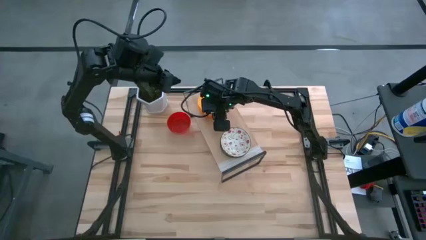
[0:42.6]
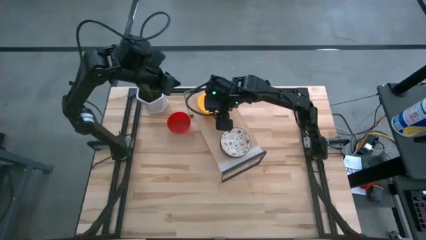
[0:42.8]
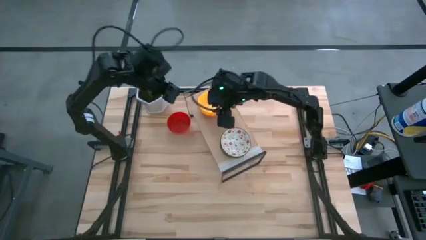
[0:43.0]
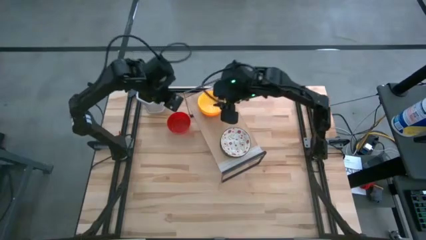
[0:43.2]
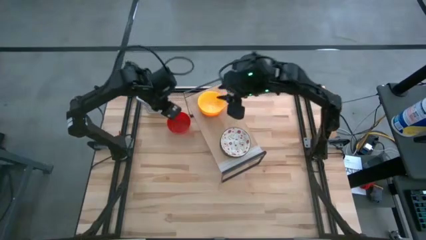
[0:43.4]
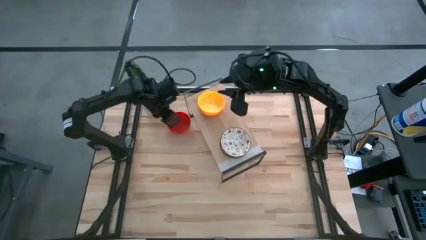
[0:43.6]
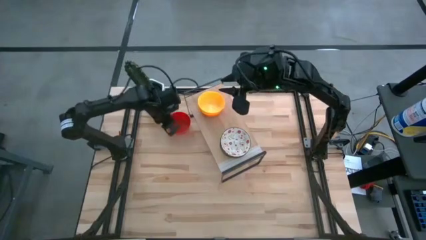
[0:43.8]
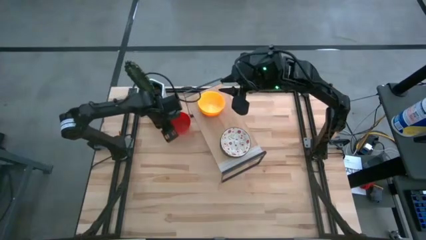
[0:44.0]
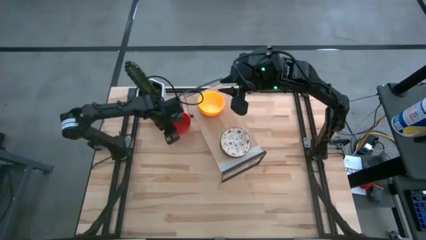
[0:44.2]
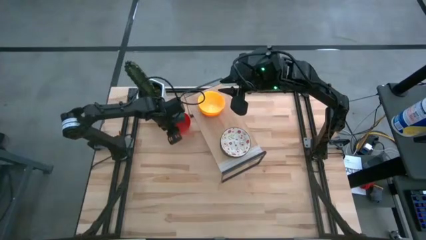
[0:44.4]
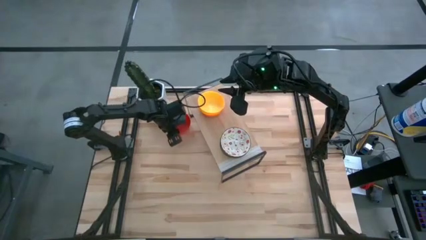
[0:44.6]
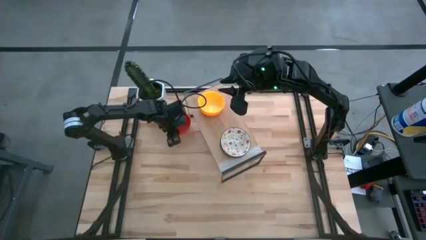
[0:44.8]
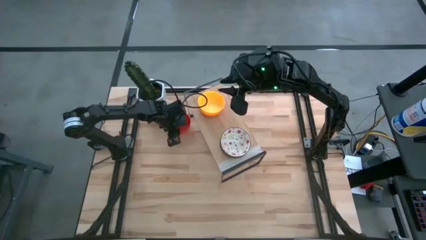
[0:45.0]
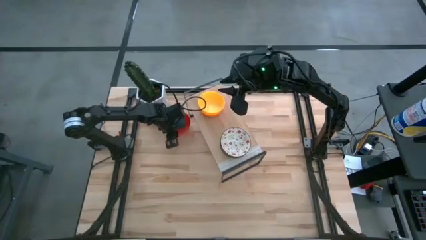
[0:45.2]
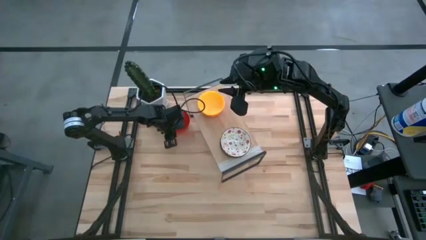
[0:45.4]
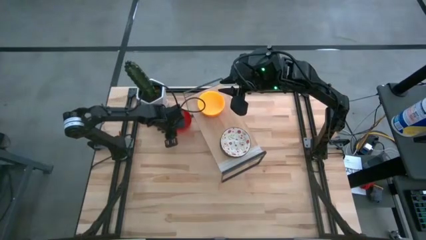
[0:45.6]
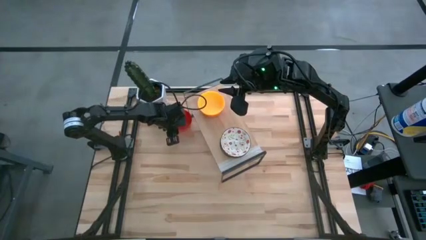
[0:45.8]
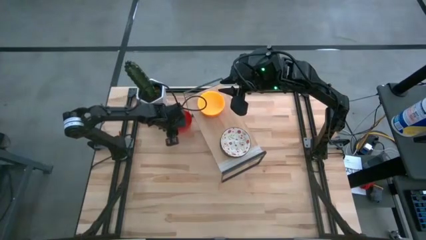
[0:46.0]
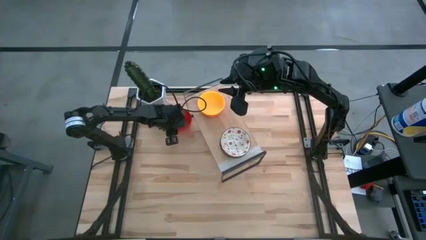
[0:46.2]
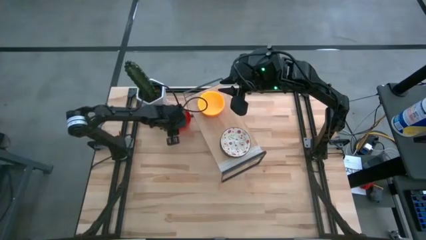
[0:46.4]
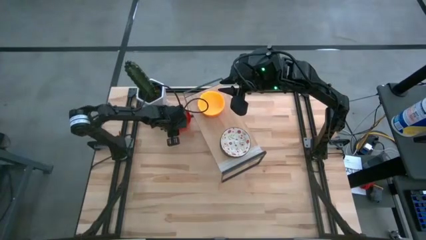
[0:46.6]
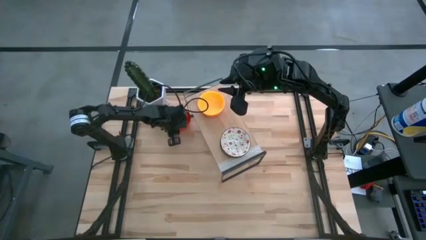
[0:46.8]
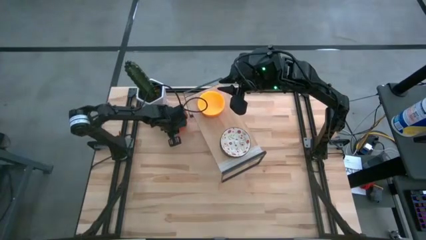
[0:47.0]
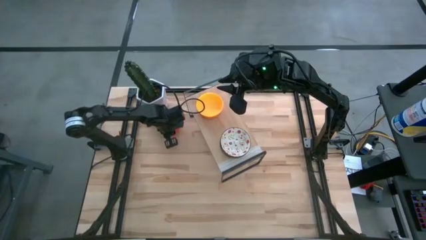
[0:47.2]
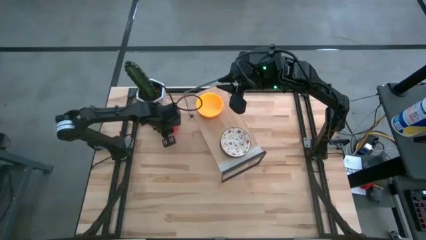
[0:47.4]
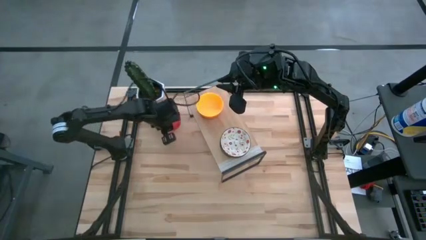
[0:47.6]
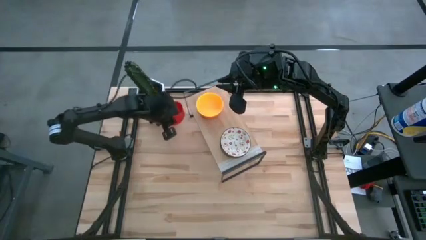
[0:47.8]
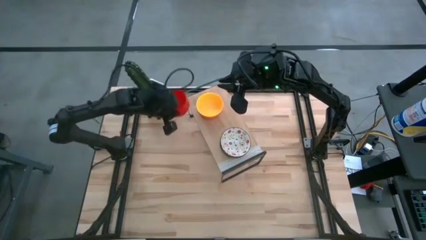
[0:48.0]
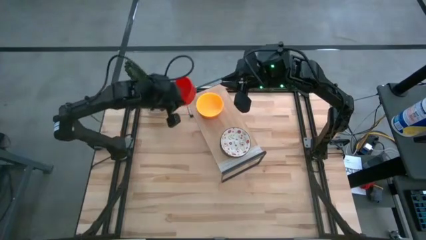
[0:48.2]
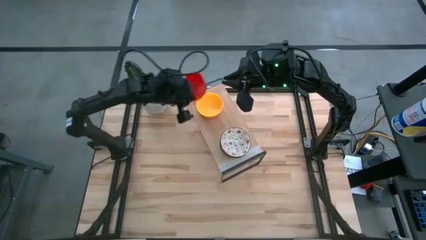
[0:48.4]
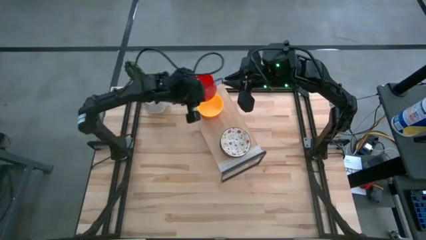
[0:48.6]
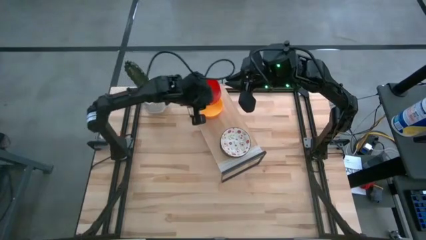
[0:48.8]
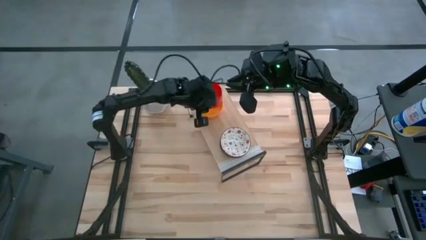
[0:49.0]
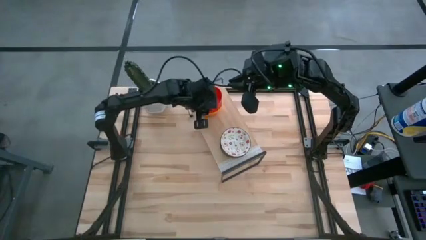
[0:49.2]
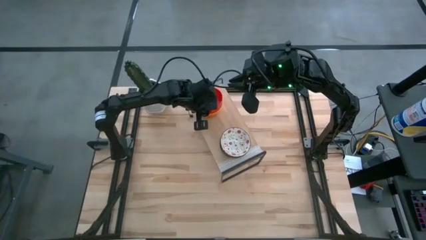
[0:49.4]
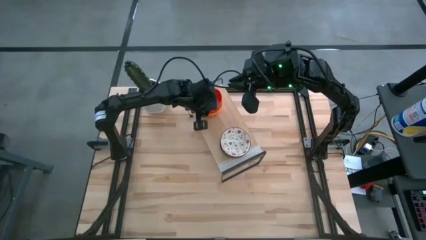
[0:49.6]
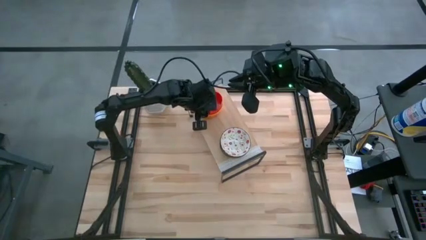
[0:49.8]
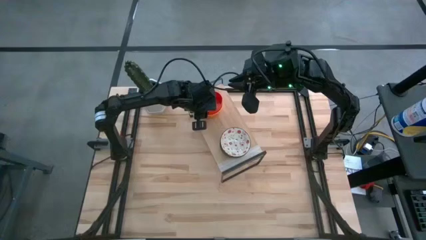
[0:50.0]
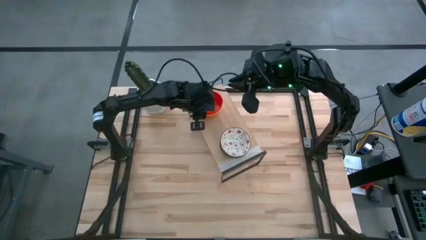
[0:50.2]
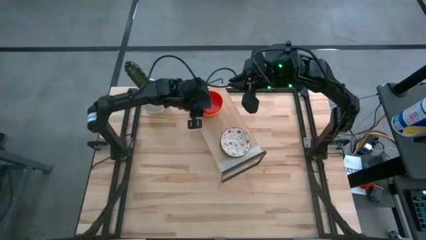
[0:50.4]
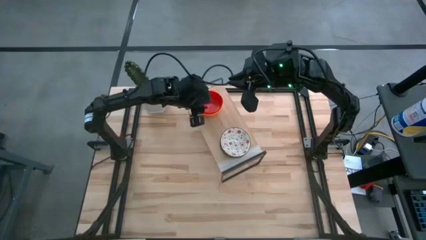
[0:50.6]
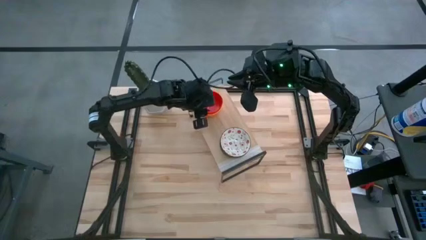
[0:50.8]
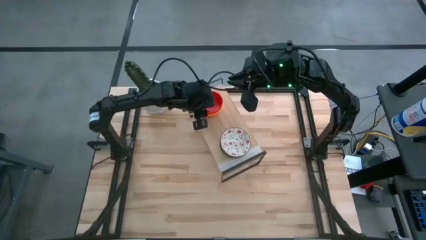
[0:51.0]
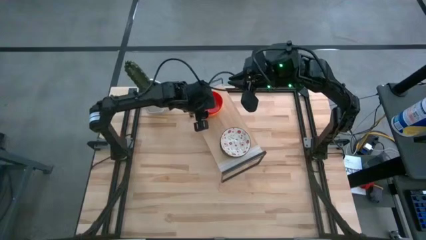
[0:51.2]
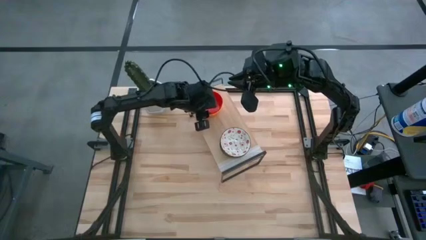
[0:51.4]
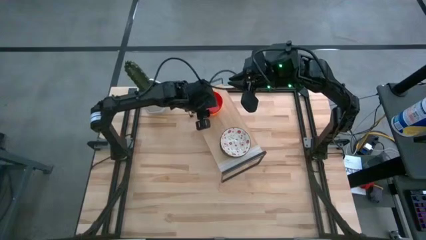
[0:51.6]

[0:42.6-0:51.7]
Task: Pick & Place Mini bowls
Stack the orange bowl on the yellow bowl

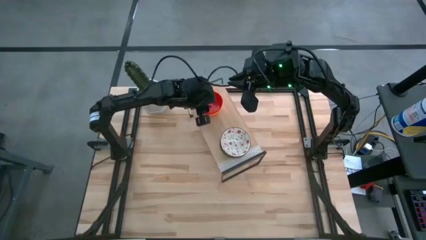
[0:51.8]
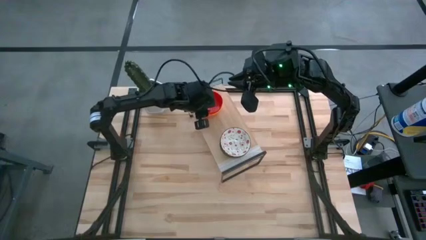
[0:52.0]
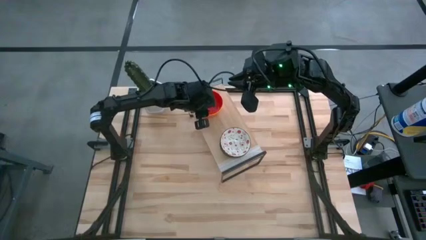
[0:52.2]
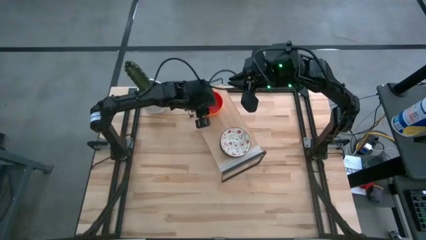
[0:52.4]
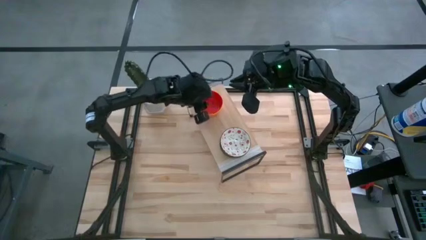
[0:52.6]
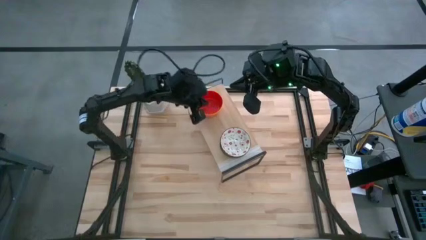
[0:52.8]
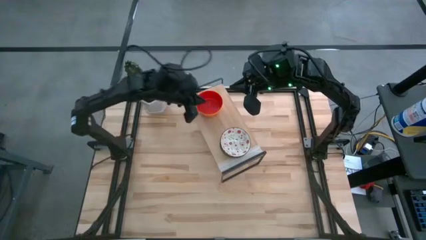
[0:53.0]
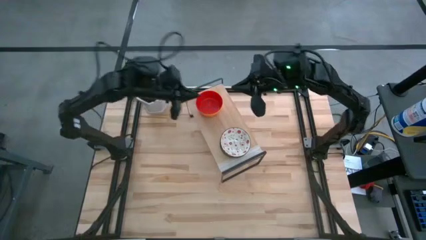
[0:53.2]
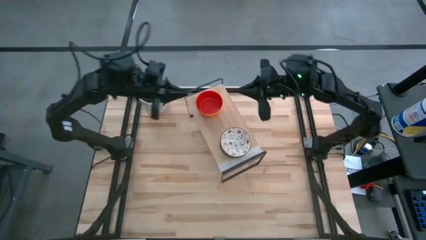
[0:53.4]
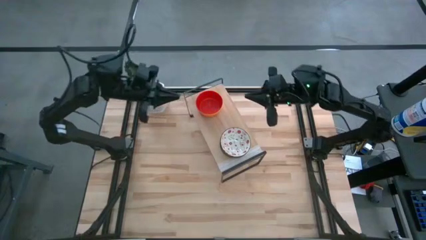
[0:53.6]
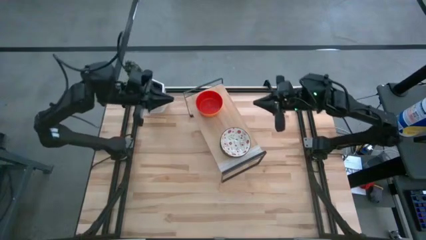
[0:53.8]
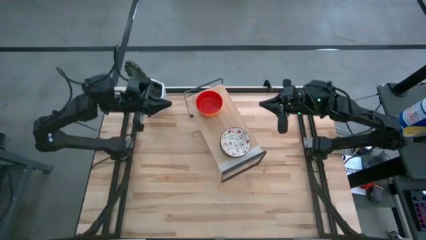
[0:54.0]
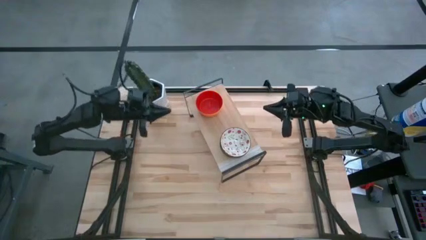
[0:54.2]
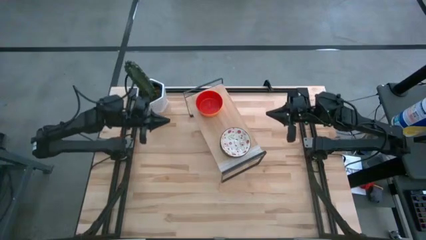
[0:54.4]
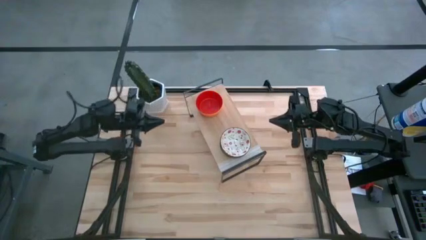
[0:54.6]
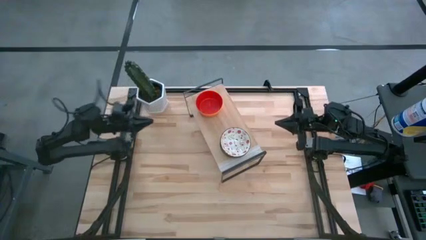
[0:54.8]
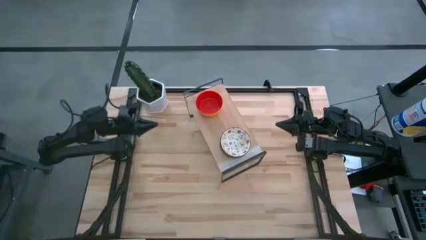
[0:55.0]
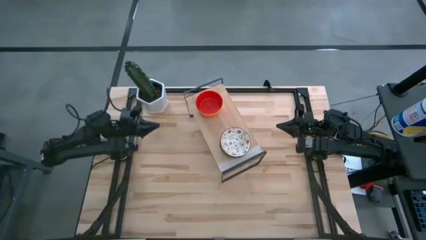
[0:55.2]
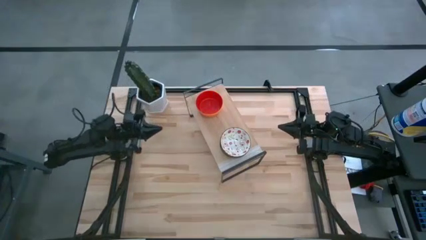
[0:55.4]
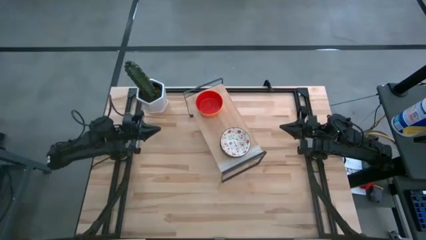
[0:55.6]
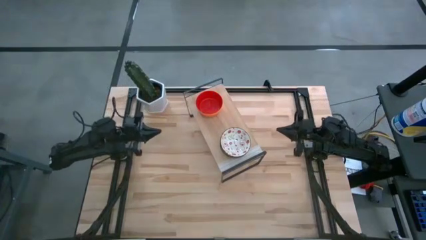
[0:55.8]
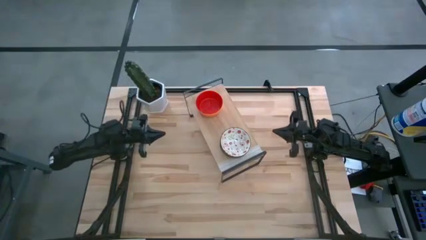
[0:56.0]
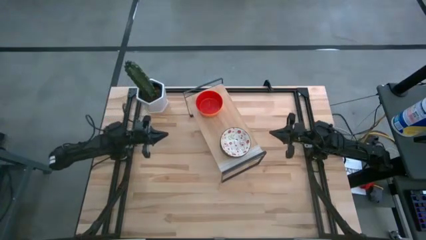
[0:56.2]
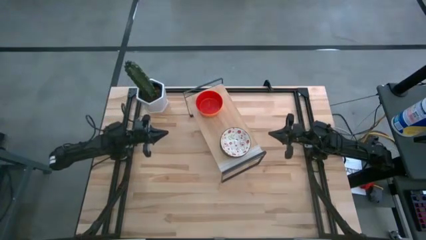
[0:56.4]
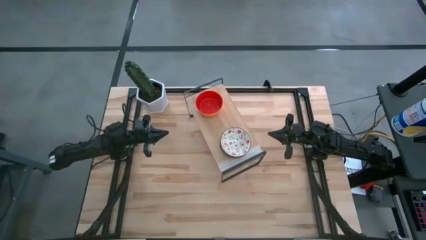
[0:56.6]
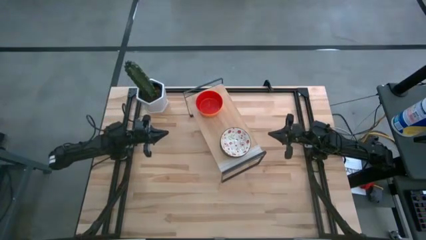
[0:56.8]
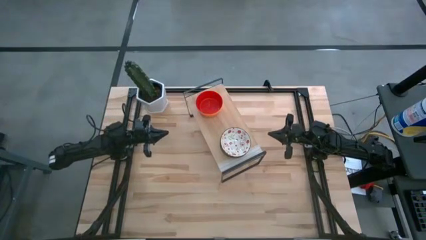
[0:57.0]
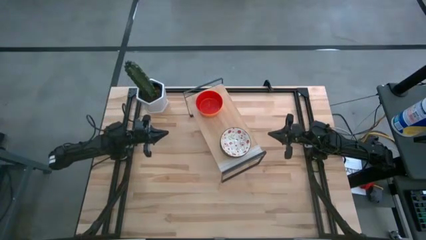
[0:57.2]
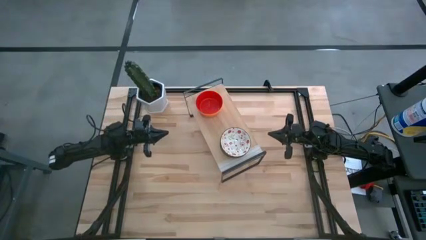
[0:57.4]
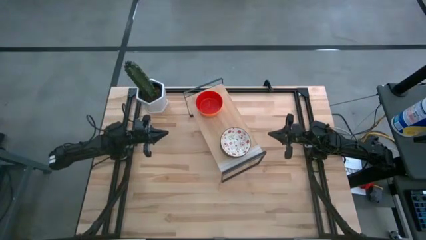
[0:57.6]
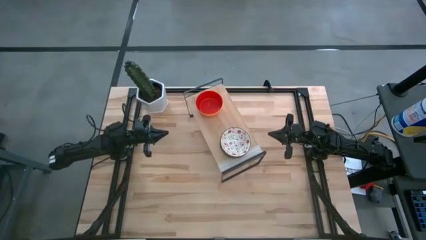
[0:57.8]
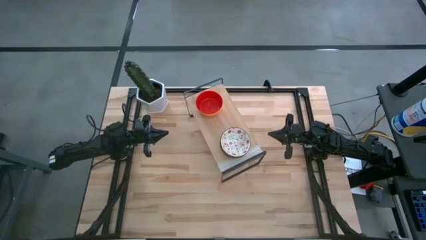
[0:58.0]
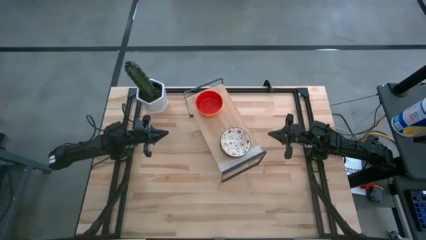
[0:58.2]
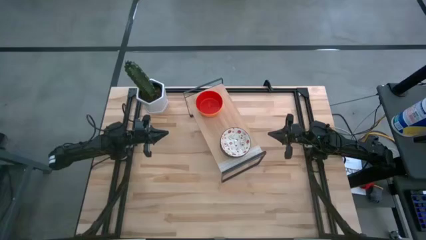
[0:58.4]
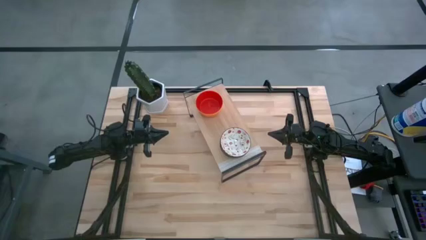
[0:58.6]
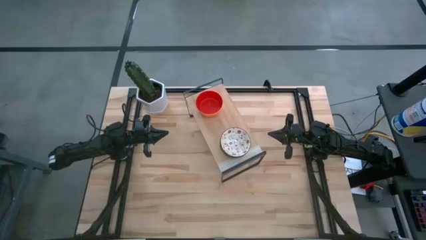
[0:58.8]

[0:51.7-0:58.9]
Return to Home Position

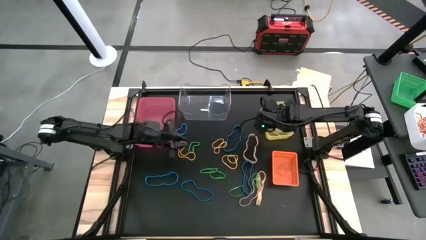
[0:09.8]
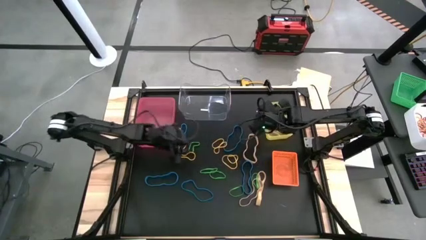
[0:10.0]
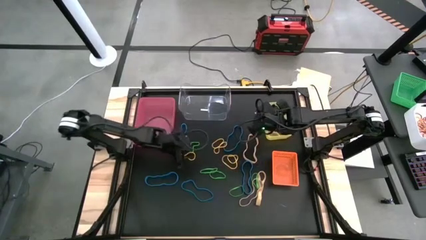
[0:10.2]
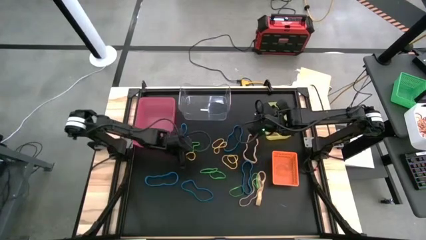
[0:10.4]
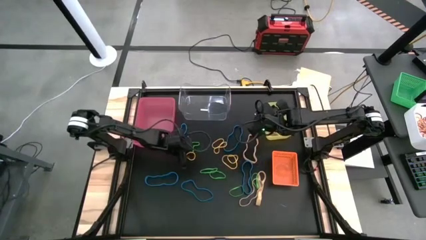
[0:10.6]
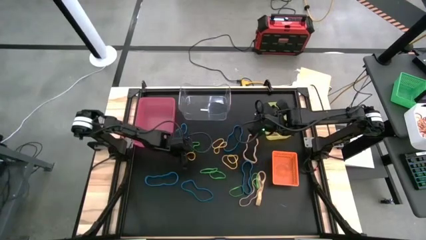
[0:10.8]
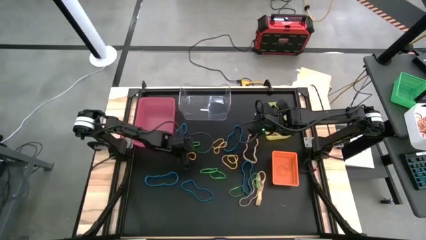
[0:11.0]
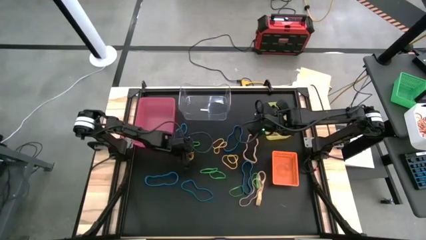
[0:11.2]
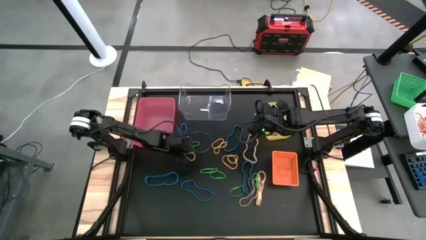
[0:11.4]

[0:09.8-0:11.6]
Task: Sort rubber bands into baskets
Put the yellow rubber band into the pink bin
